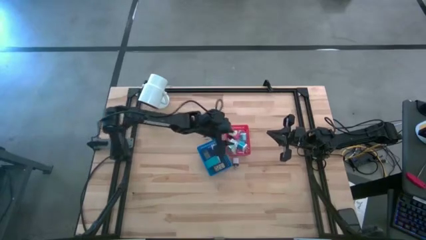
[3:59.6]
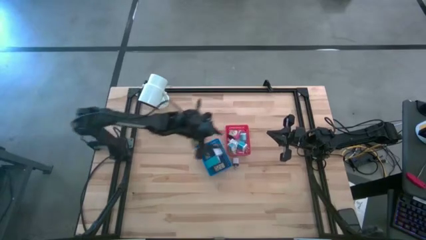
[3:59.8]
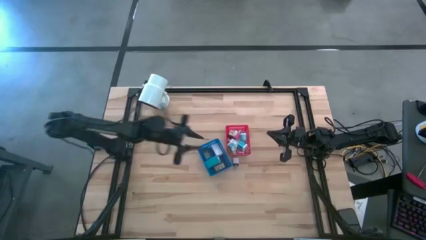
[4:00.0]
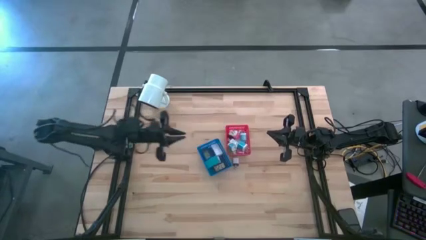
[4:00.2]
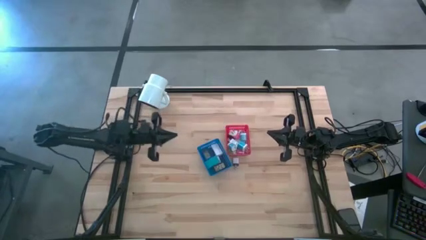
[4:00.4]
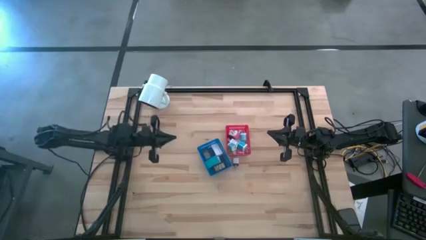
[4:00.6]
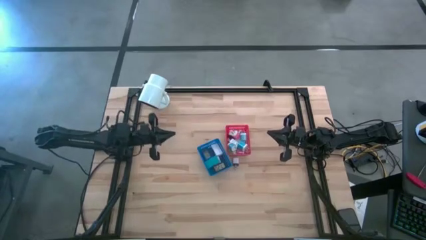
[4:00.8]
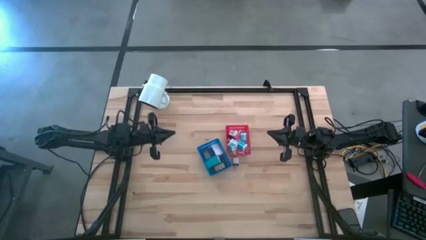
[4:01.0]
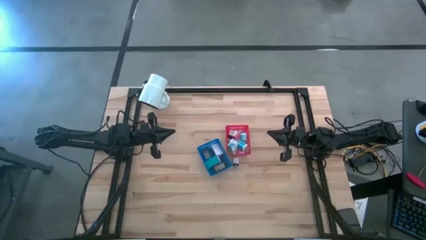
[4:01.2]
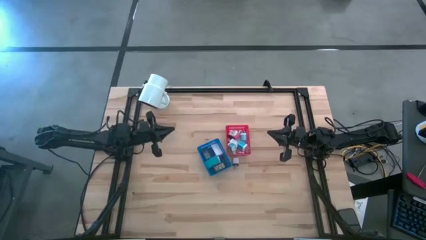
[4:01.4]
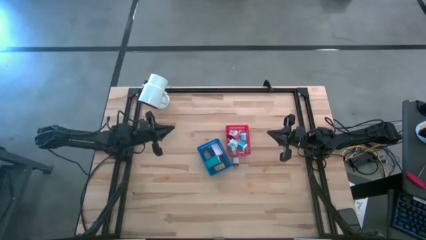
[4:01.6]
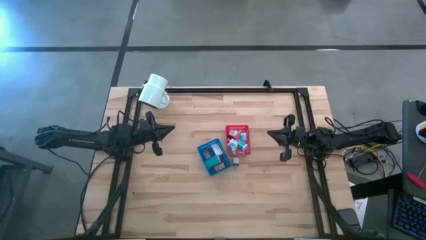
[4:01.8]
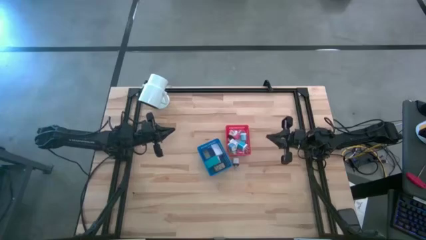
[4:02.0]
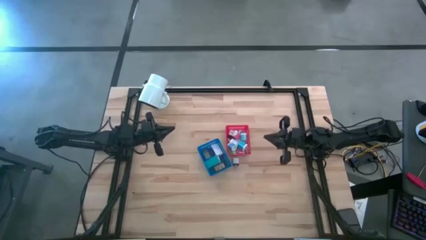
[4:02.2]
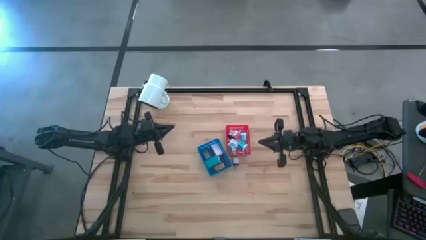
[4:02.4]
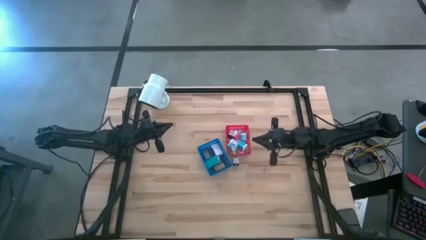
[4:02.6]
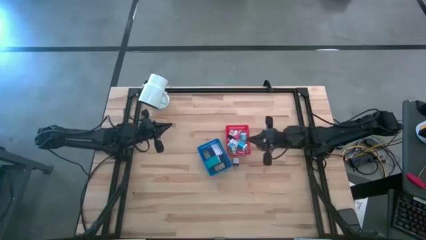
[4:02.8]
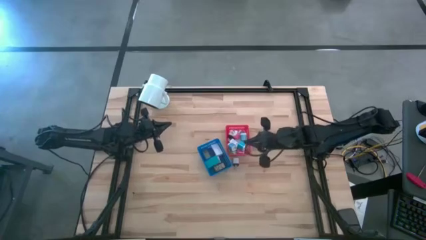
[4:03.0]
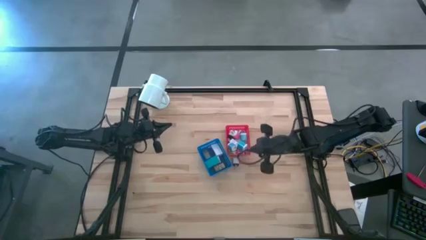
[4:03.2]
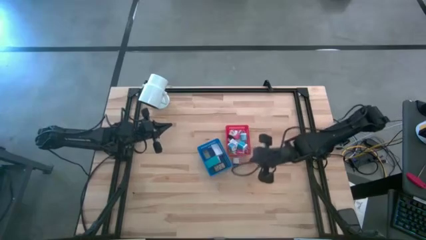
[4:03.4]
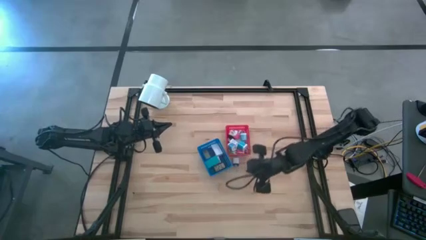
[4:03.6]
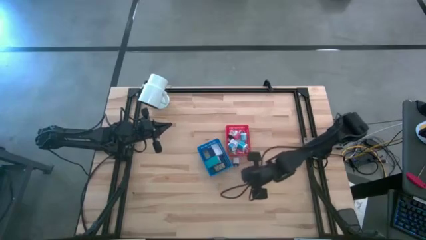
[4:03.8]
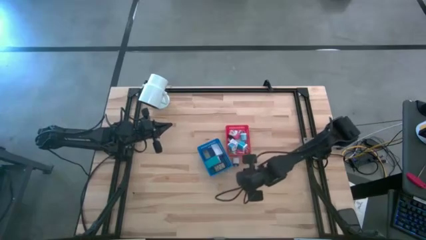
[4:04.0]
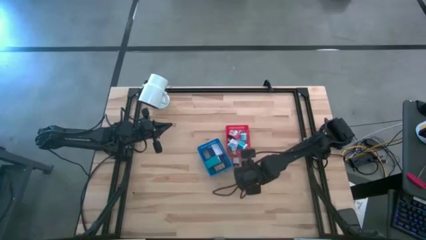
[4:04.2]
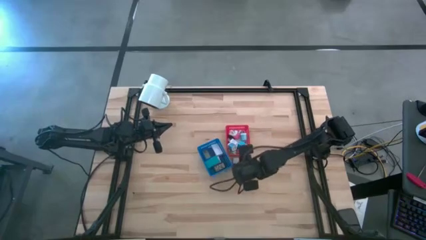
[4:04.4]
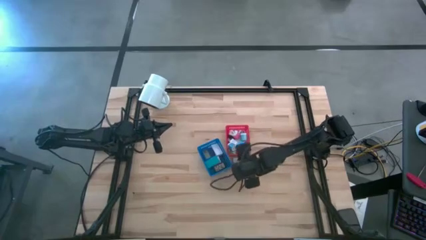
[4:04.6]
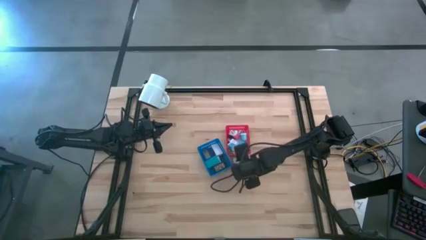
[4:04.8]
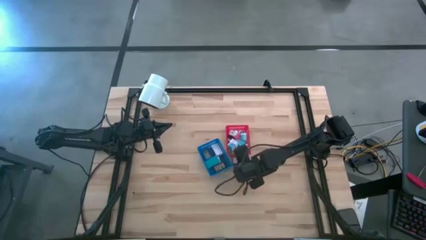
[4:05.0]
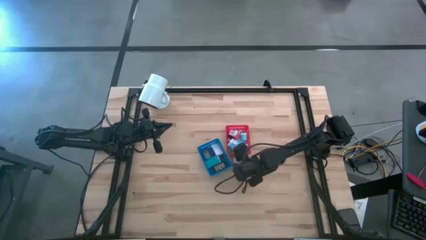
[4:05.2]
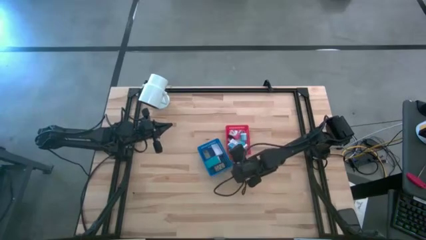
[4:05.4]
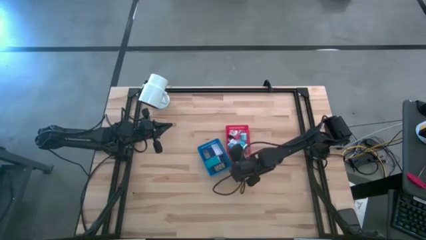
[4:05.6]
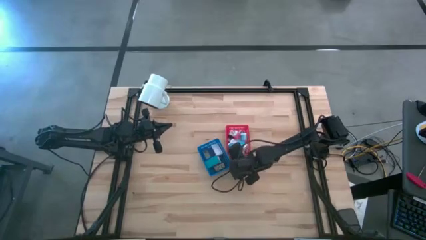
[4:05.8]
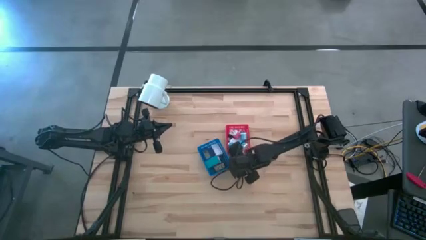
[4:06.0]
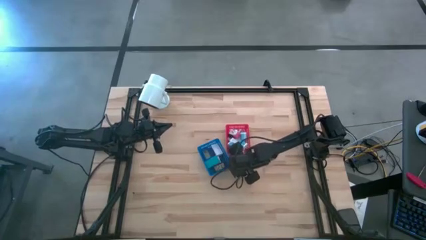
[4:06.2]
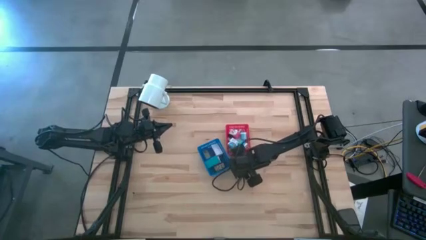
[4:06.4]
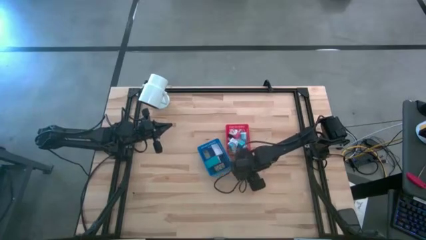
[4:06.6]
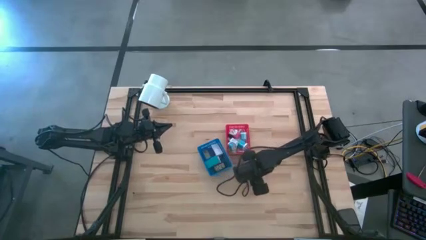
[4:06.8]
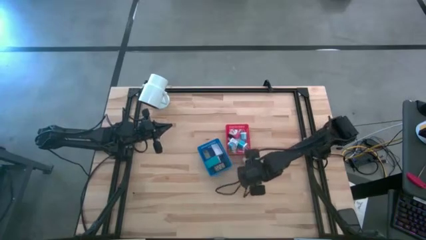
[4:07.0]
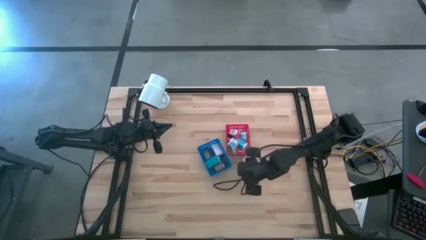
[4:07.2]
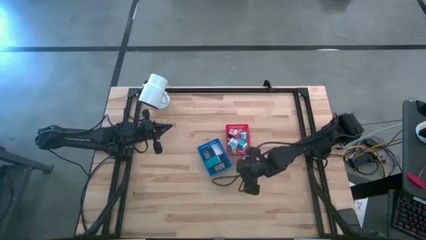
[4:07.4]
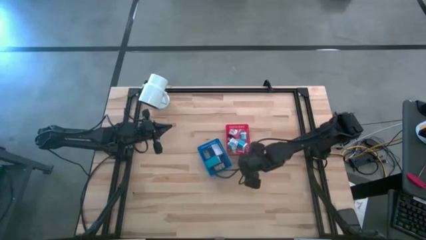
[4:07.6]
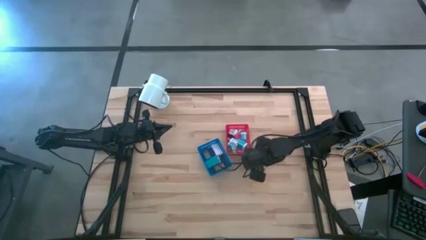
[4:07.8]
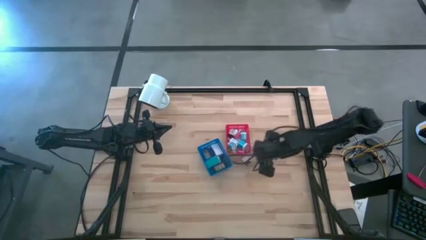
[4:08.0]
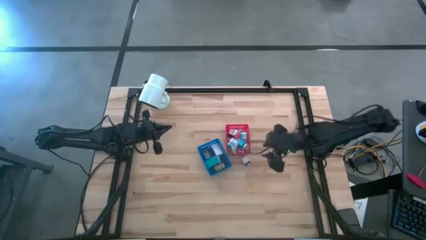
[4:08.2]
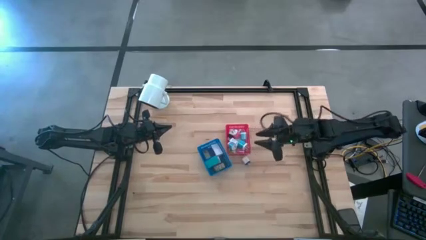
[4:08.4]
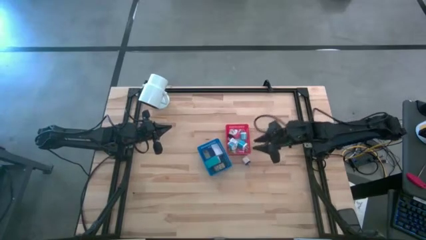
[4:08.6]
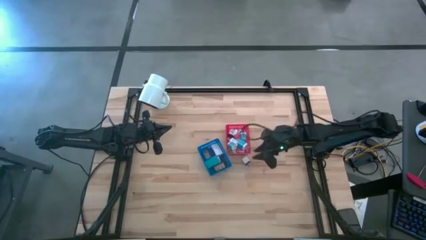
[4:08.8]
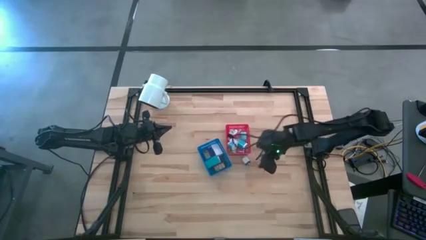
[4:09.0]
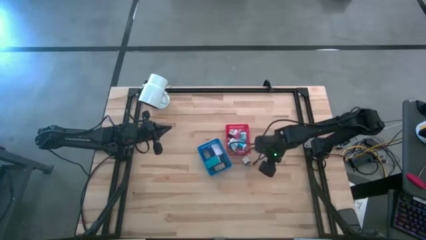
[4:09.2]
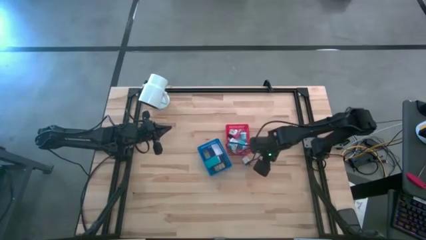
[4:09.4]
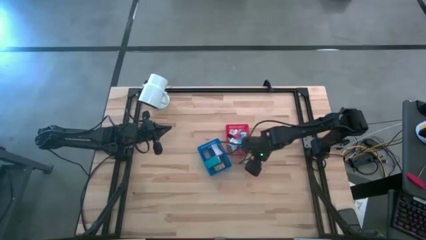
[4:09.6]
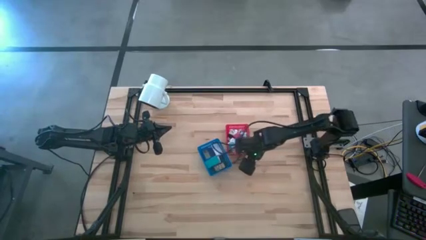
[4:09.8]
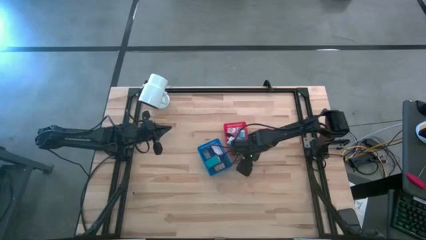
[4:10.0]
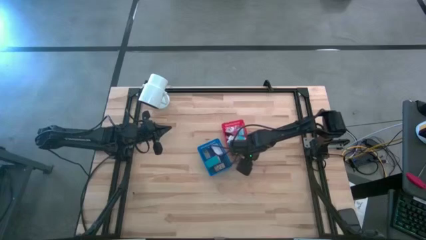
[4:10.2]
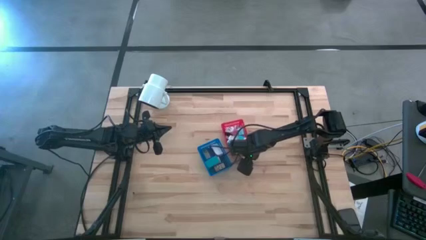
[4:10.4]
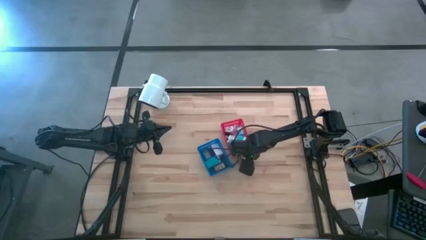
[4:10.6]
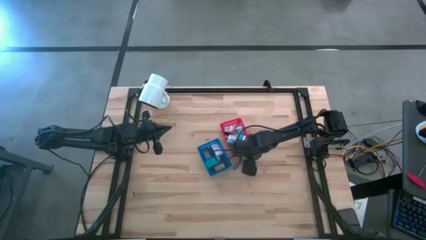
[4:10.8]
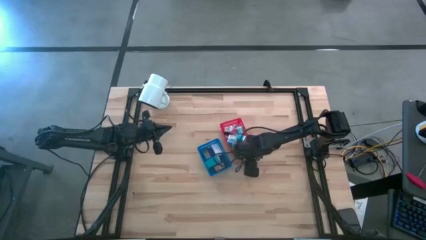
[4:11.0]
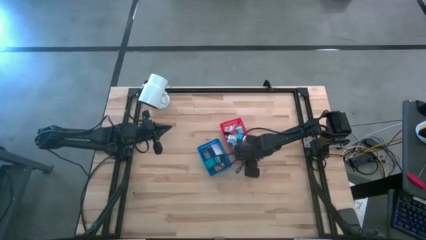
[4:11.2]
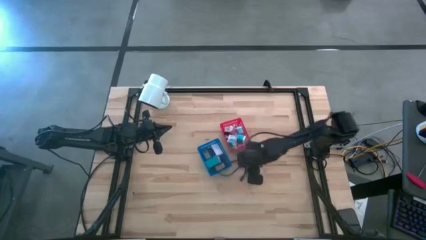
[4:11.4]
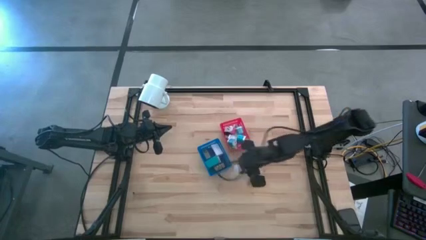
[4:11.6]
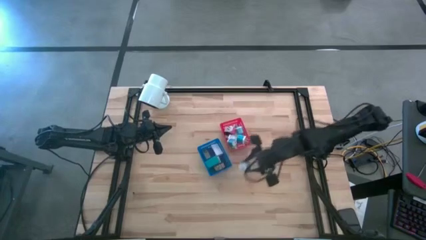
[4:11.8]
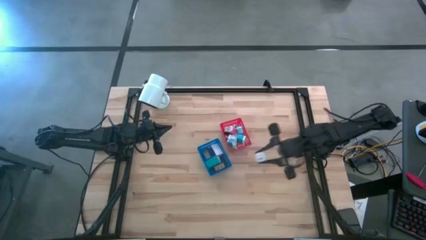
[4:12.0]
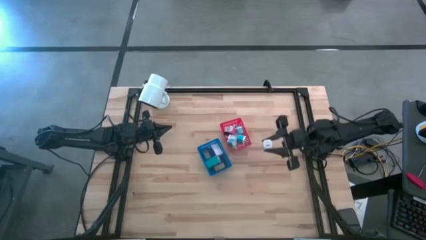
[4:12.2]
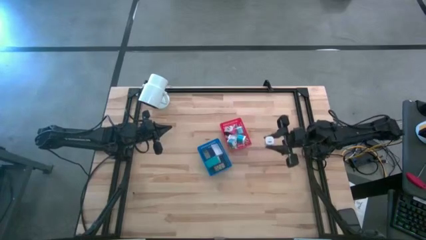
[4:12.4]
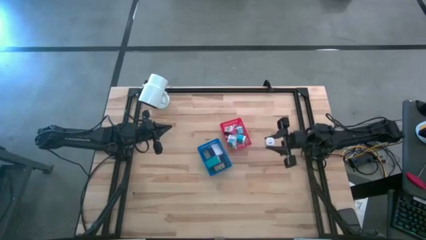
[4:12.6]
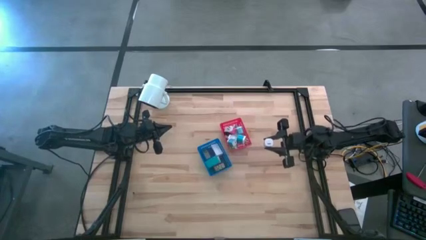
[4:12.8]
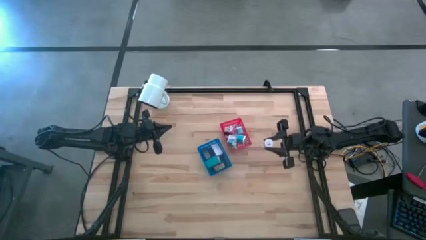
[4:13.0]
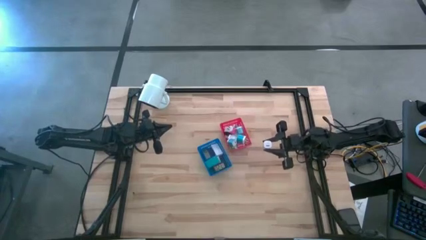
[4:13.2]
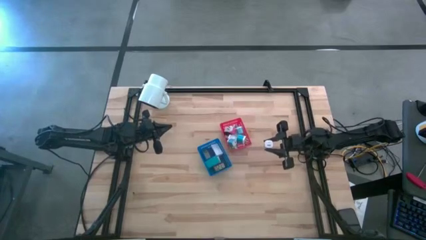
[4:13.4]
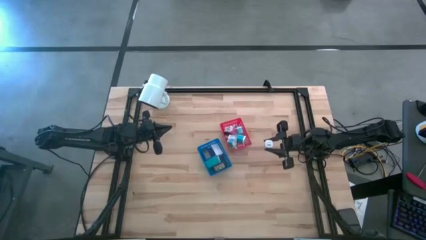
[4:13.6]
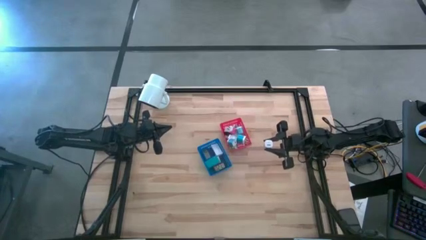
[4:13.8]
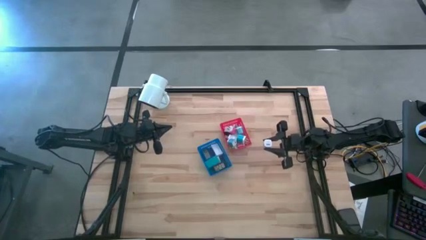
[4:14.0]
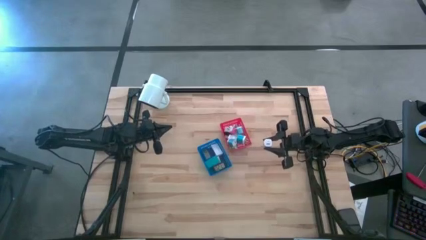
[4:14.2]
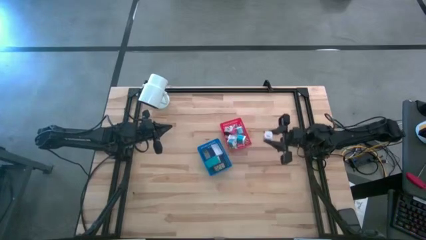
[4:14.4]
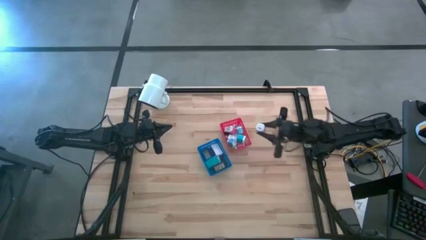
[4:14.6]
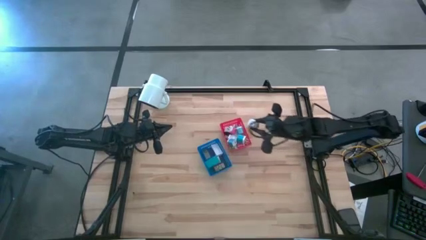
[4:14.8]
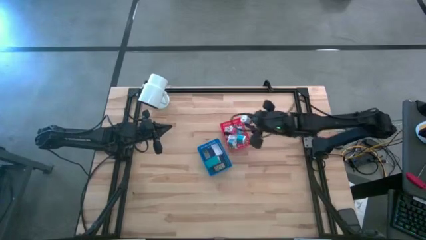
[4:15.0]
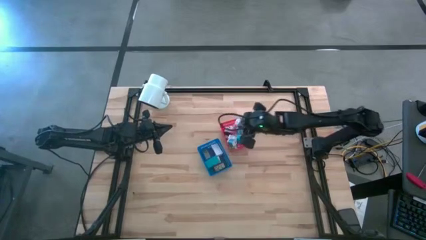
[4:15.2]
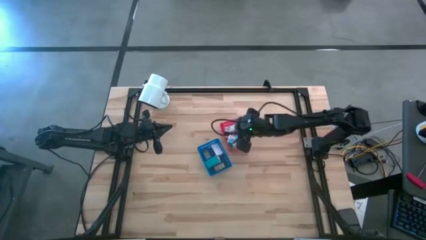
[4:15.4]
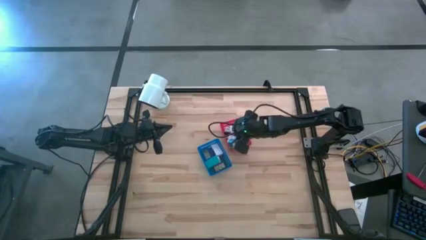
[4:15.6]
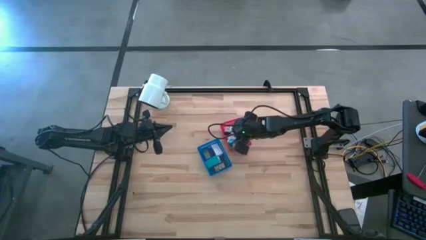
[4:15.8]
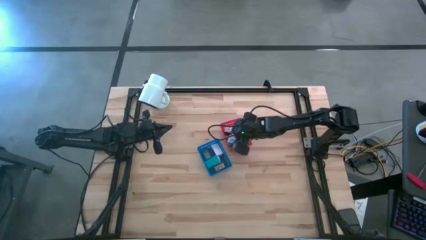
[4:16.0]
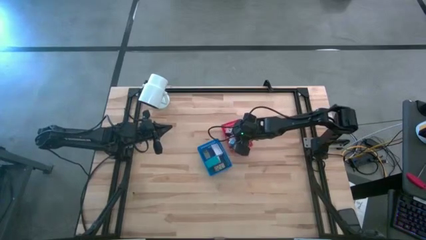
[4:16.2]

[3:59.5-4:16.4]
Task: Pick & Place Office items
Put the black charger adapter into the red bin
